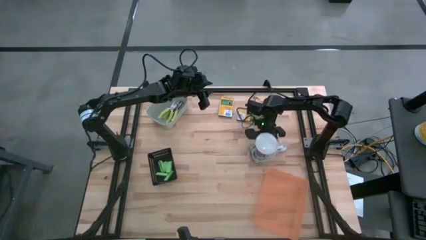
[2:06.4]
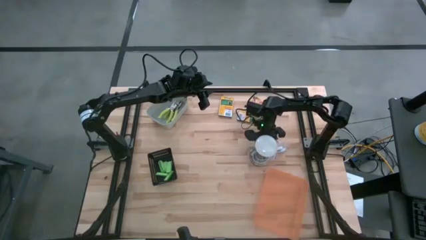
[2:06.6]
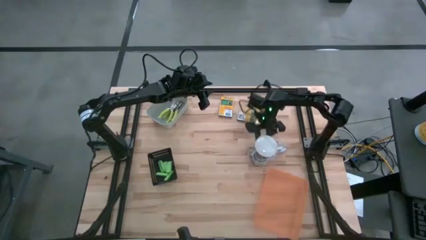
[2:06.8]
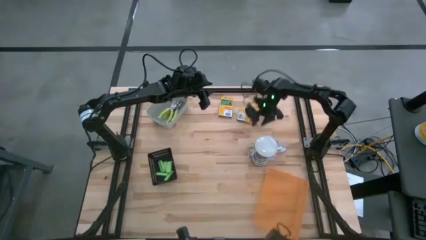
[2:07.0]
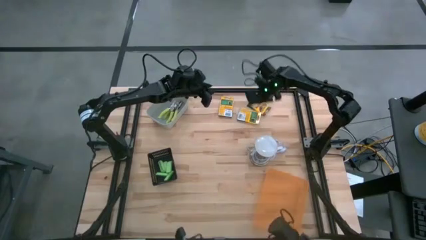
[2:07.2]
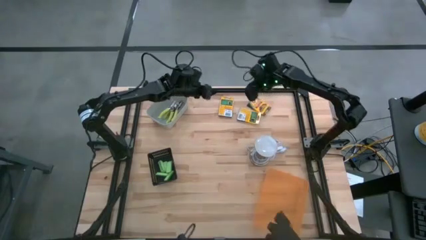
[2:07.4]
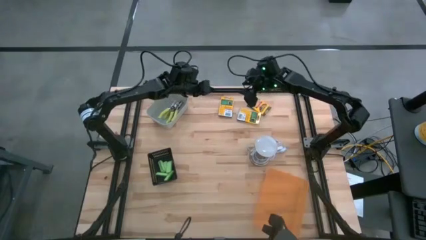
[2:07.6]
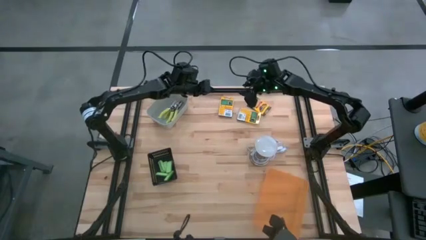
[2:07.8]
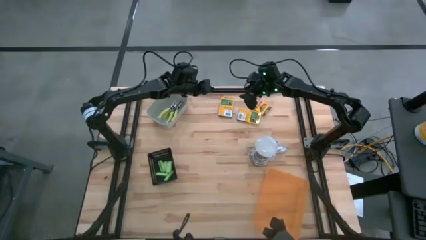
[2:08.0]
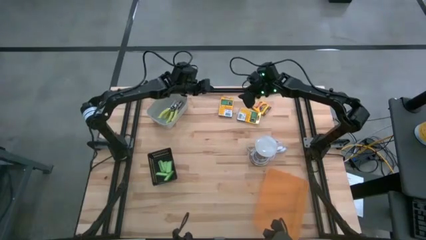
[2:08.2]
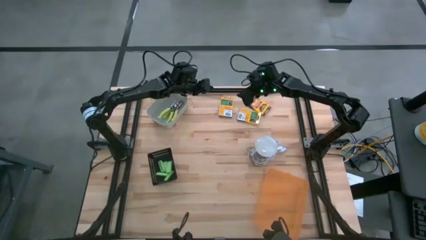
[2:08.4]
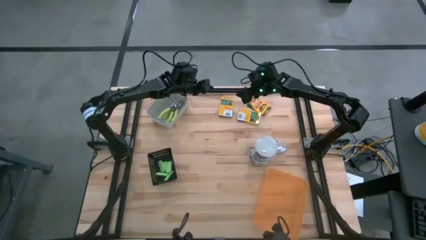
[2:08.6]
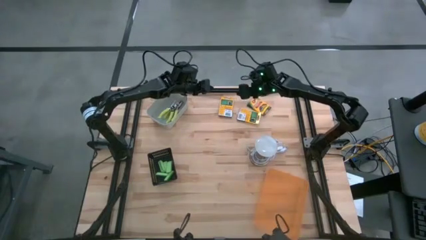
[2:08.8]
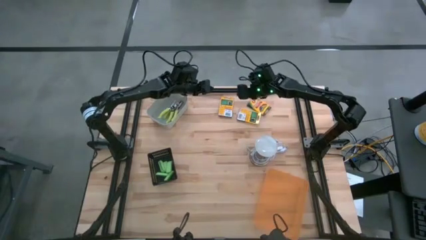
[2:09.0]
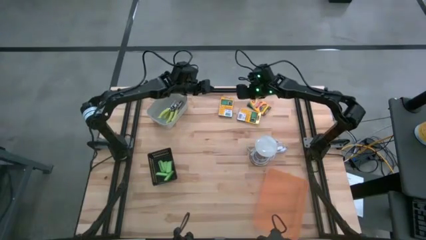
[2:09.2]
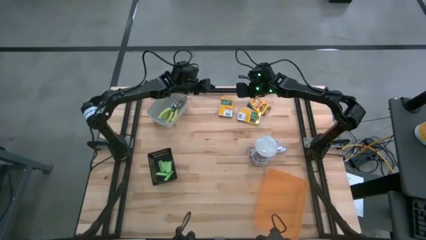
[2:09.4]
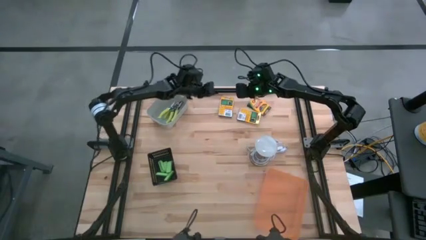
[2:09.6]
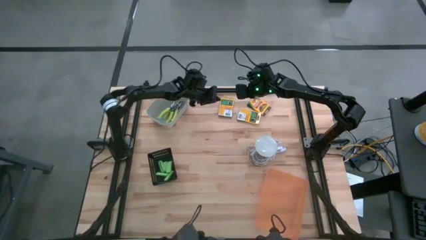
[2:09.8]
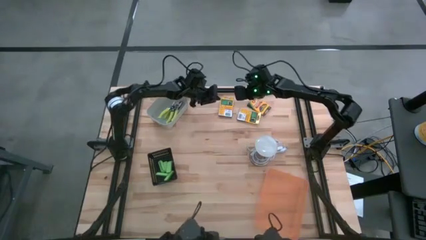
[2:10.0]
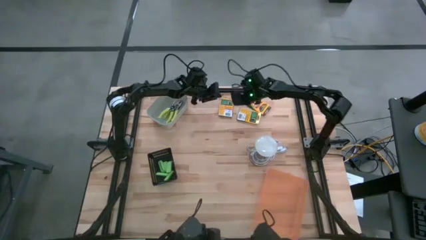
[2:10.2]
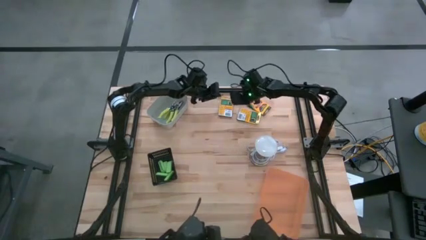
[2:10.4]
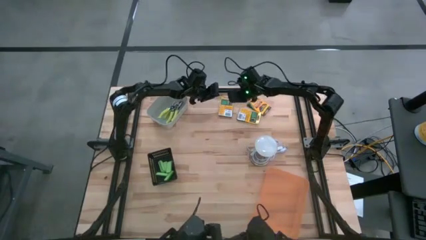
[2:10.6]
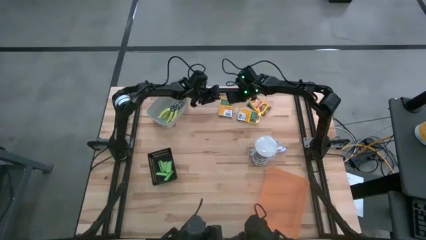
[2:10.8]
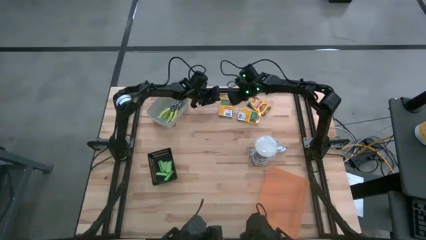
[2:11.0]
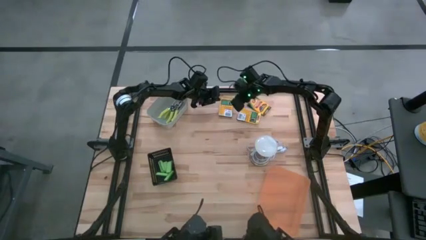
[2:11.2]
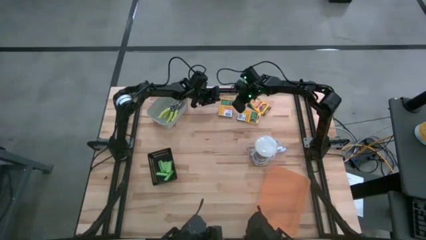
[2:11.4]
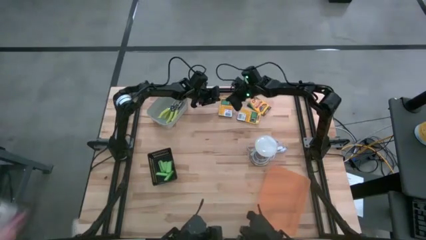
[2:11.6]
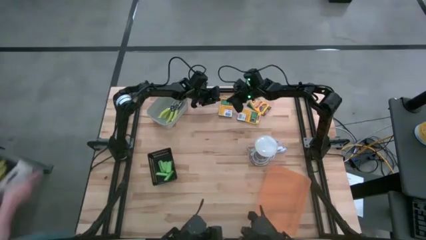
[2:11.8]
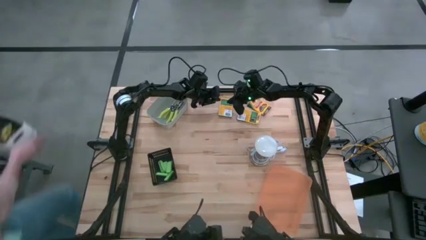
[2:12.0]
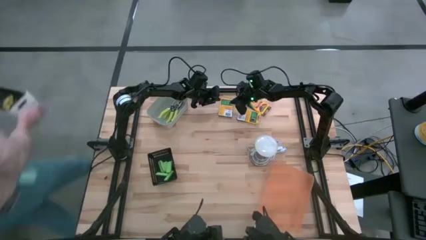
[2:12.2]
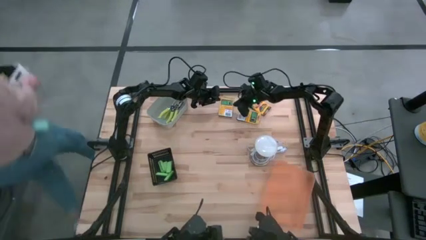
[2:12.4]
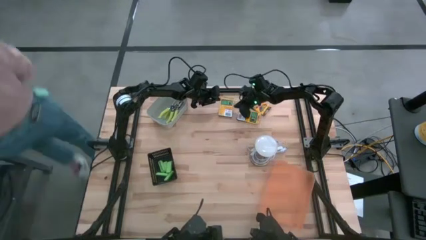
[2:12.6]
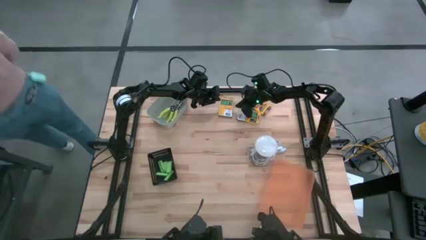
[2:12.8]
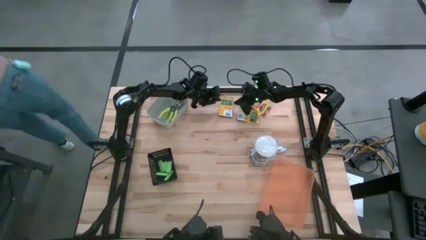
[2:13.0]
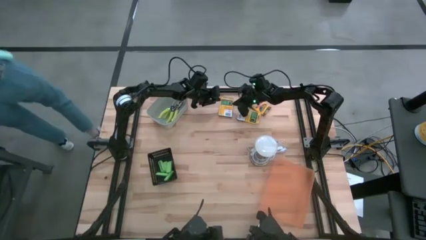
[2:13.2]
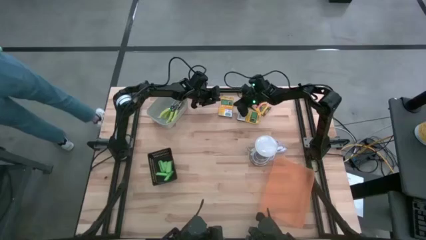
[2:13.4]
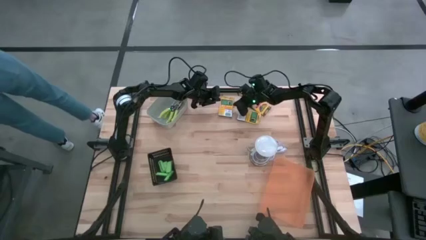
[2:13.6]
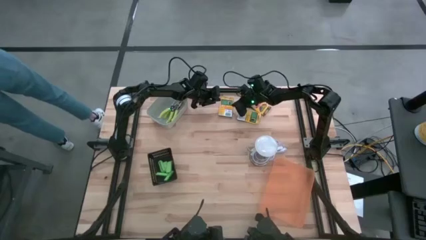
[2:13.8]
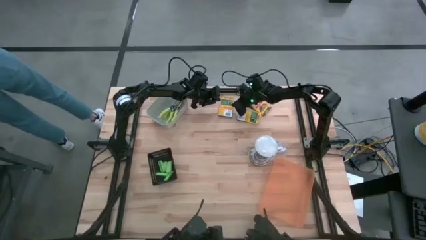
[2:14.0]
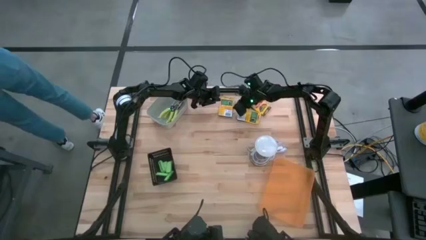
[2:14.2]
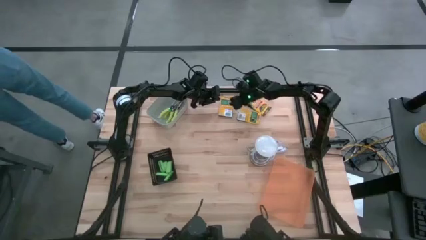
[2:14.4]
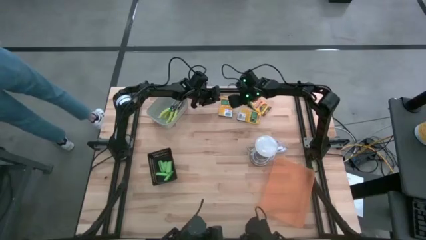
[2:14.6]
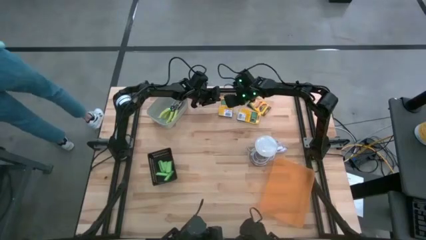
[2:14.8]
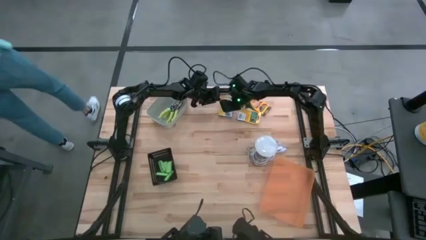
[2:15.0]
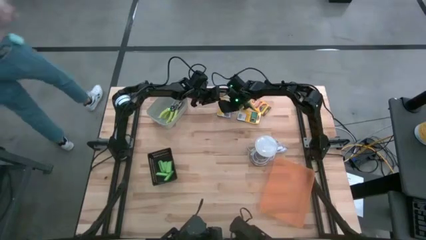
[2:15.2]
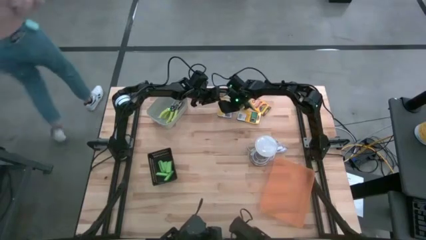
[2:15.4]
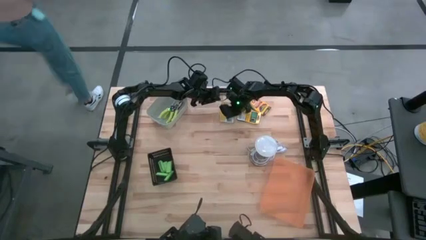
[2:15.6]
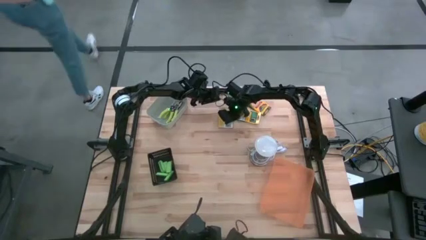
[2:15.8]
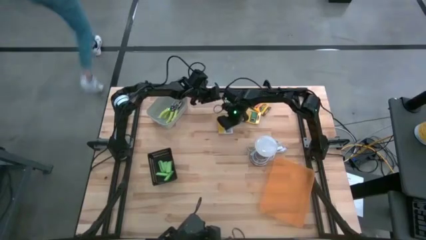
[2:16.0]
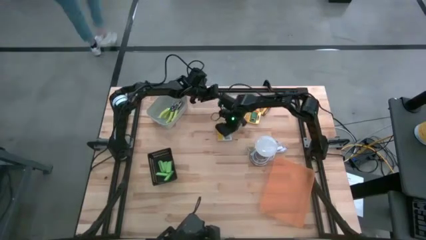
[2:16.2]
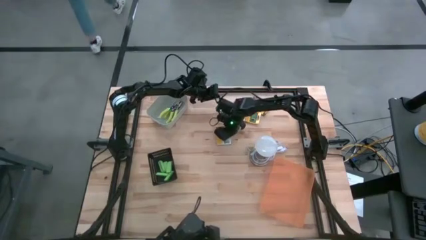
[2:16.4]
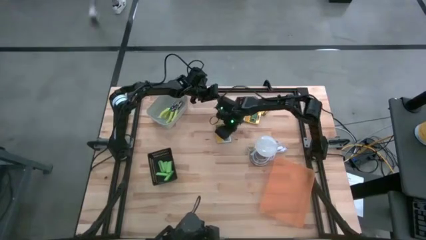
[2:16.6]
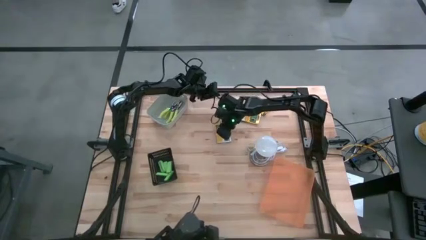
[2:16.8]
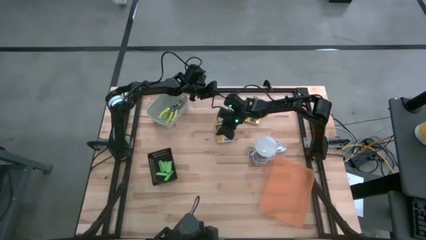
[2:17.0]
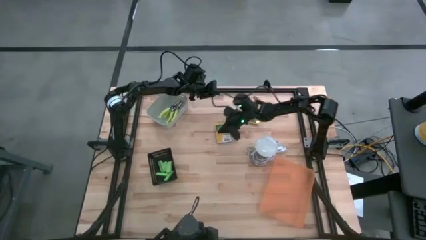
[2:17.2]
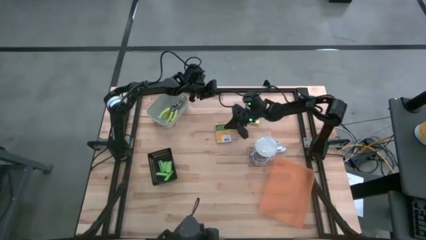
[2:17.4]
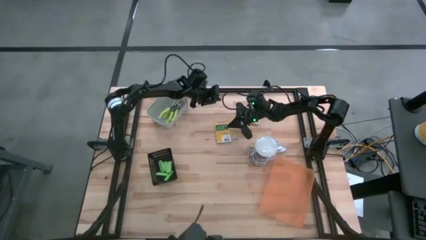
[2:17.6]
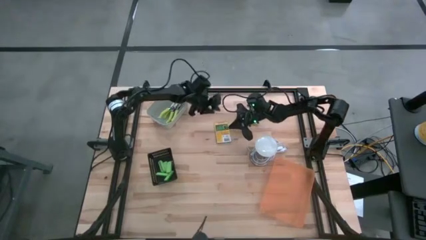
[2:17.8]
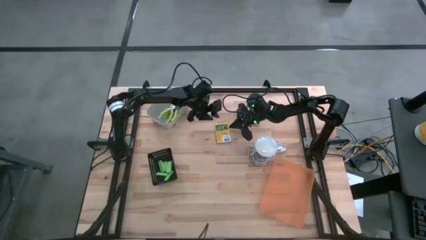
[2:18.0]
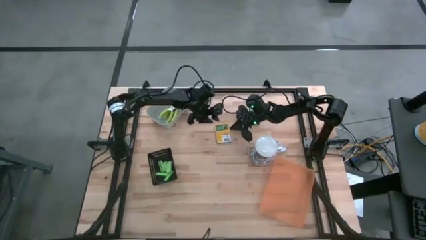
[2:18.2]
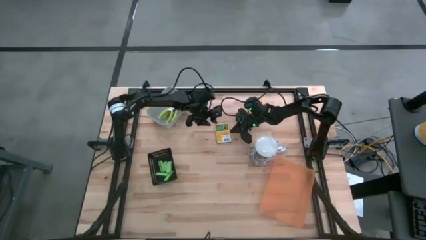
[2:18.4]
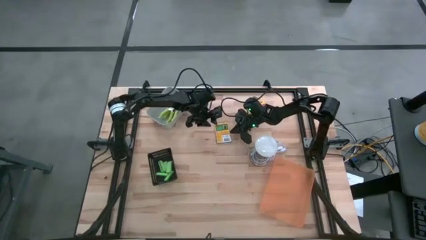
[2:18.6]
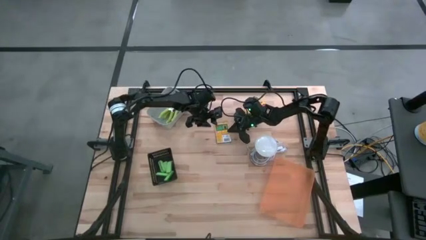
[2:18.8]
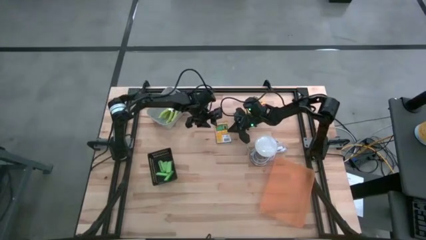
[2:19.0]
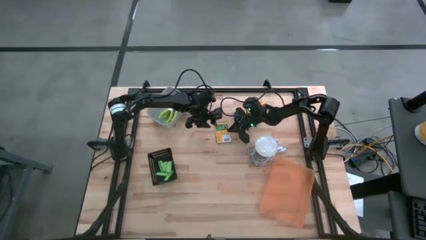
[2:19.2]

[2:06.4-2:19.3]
Task: Pick & Place School Supplies
Put the yellow yellow crayon box into the orange bin

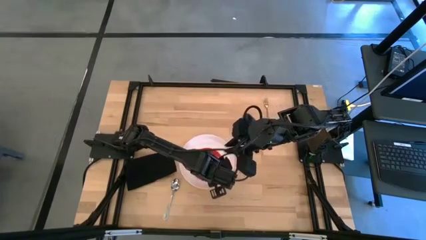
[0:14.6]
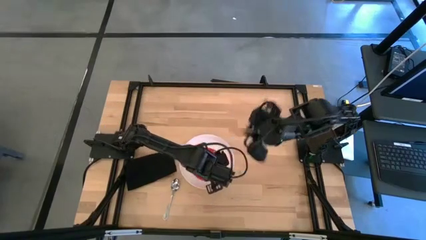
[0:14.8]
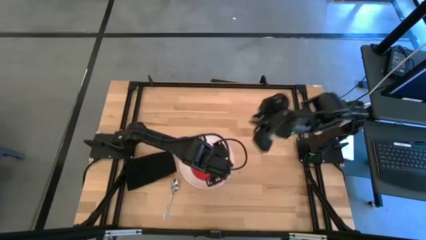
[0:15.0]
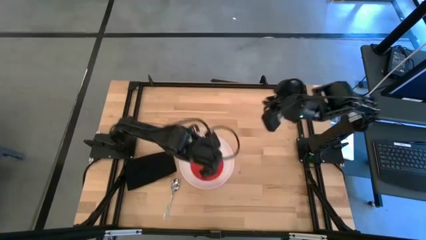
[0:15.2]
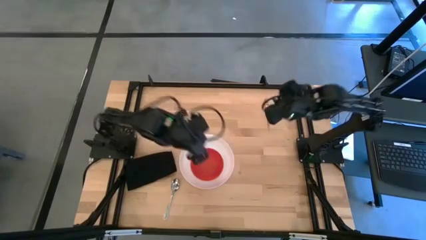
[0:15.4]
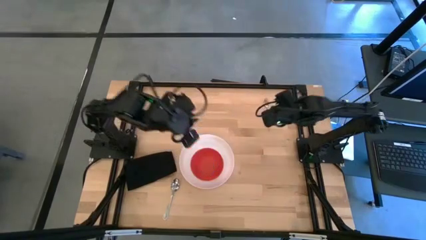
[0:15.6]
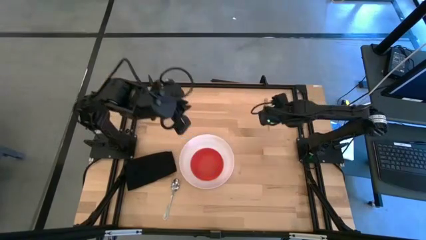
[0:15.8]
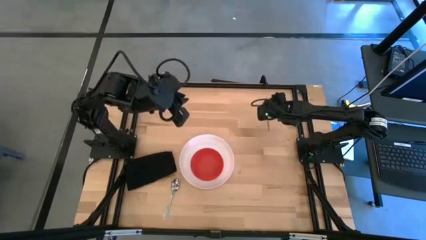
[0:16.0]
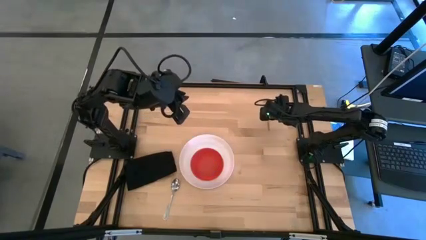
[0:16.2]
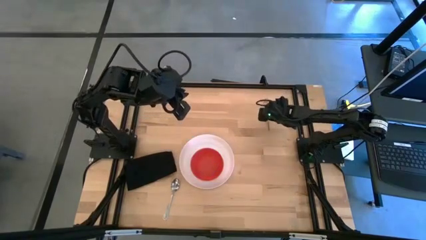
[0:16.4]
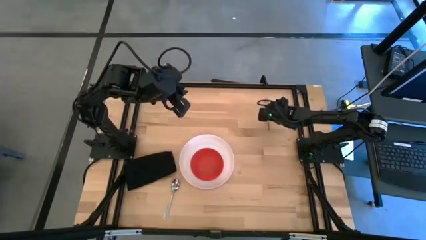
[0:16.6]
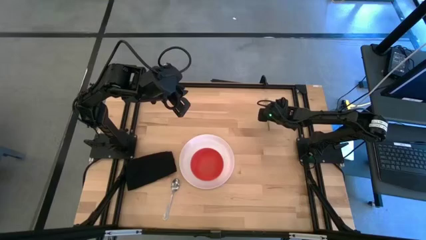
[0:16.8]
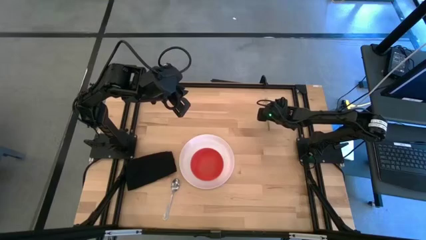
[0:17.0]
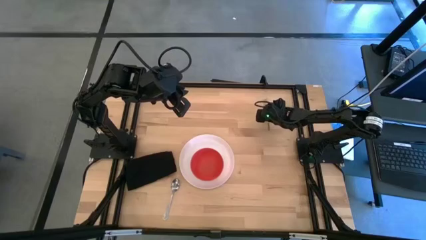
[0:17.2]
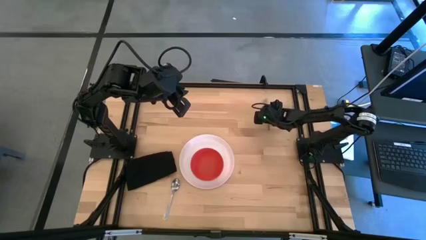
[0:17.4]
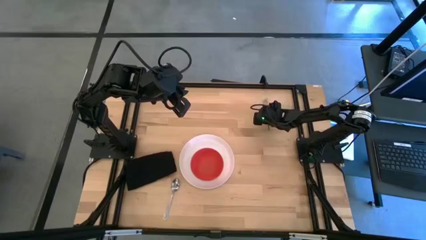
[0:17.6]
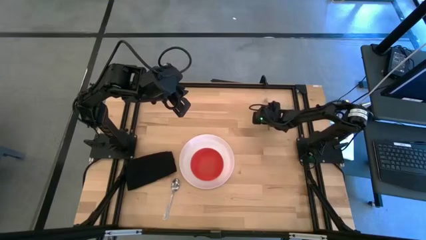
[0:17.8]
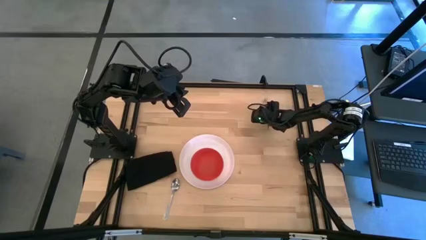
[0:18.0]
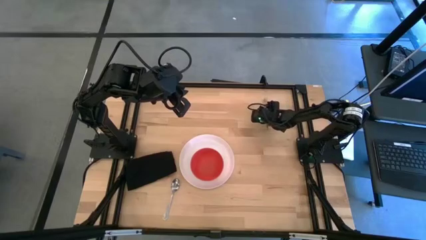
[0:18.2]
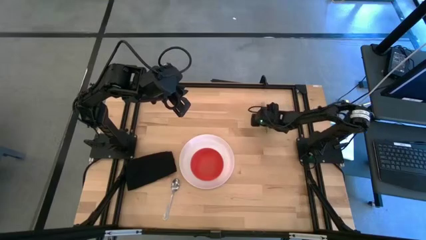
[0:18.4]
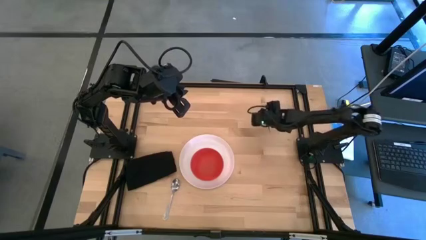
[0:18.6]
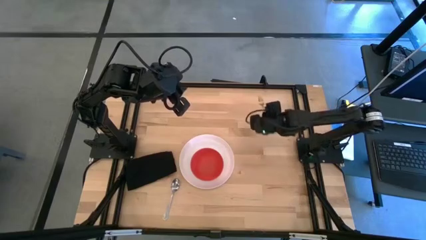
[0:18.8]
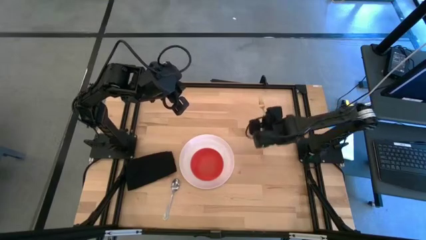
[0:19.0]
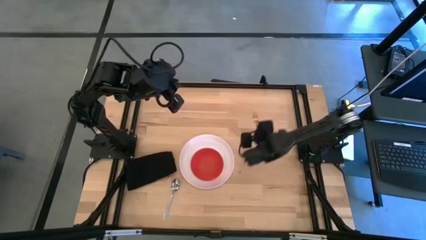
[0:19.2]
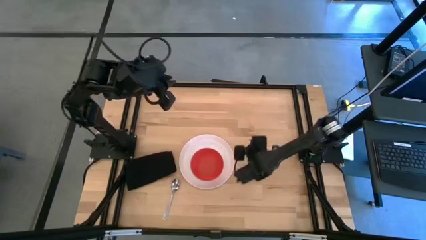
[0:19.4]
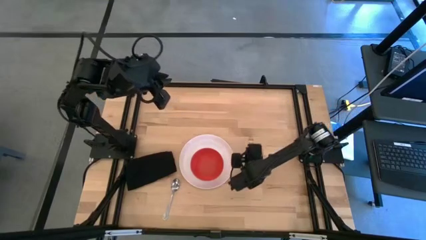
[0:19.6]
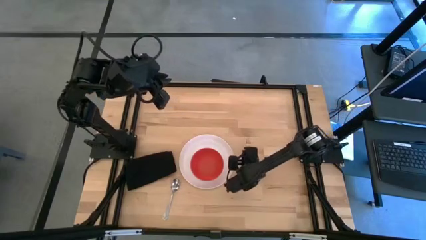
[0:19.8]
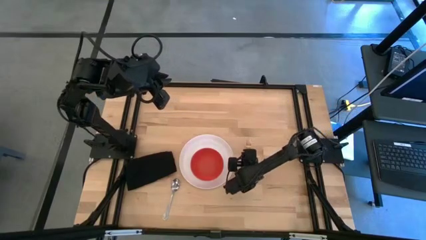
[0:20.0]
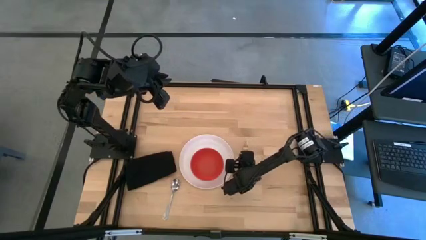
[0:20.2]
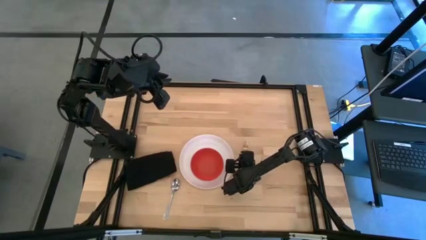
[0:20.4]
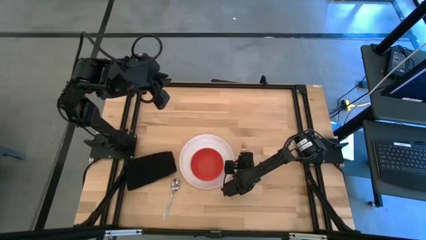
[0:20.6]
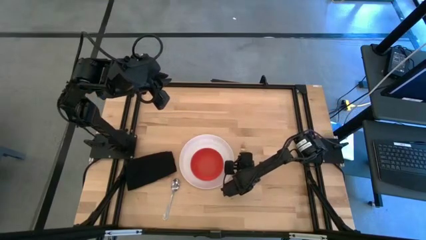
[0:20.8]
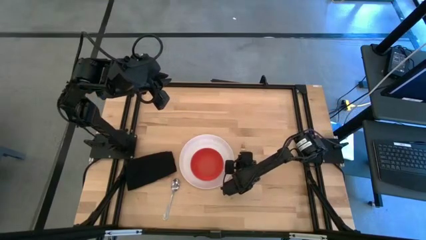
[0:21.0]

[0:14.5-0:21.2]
Task: Set table place
Move the gold fork to the right of the white plate
